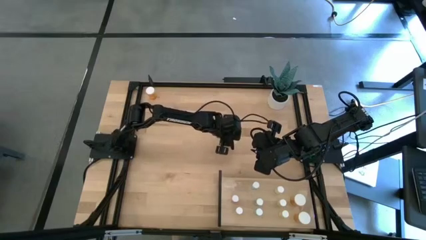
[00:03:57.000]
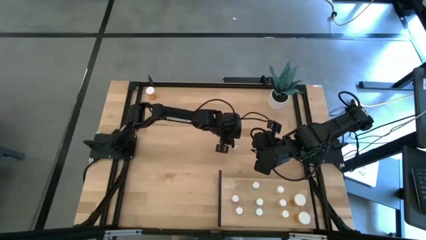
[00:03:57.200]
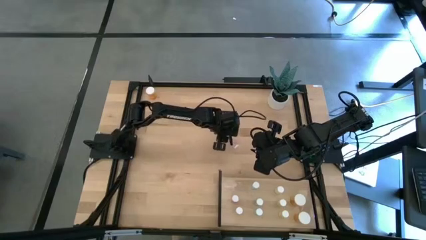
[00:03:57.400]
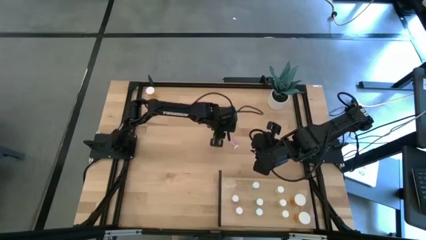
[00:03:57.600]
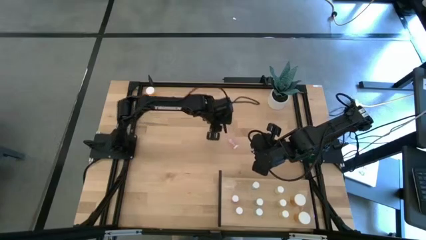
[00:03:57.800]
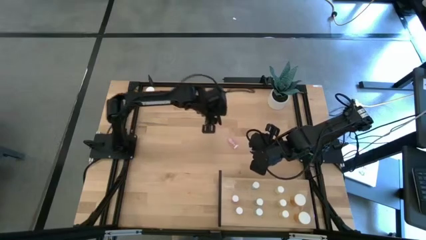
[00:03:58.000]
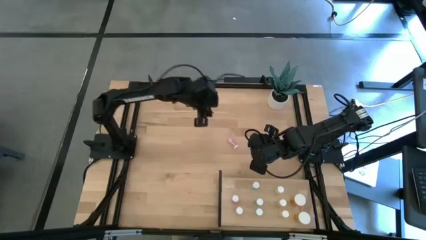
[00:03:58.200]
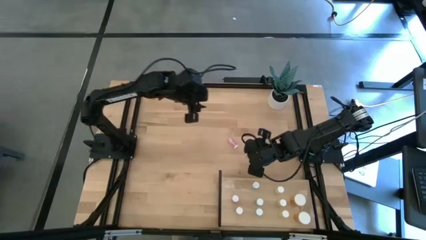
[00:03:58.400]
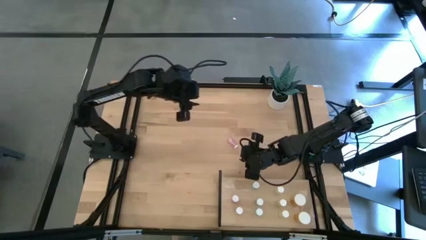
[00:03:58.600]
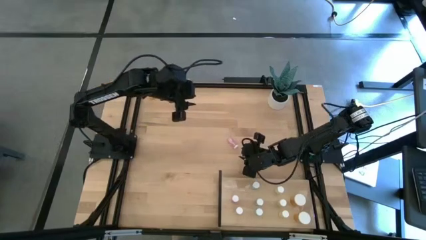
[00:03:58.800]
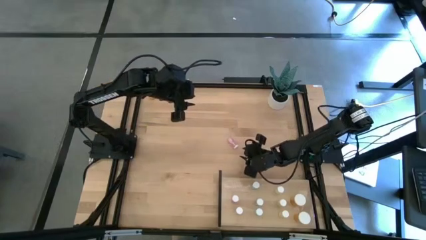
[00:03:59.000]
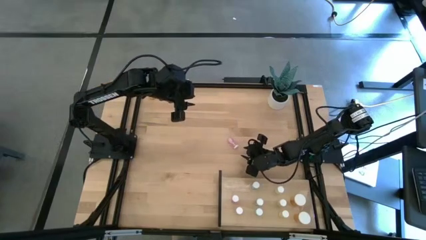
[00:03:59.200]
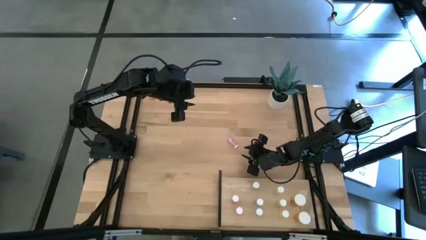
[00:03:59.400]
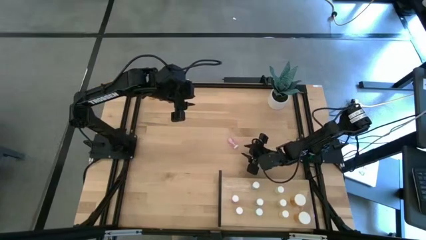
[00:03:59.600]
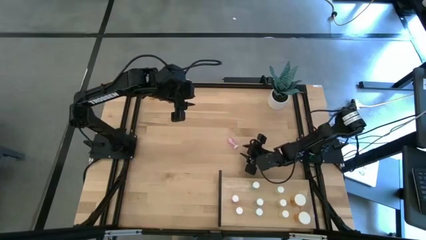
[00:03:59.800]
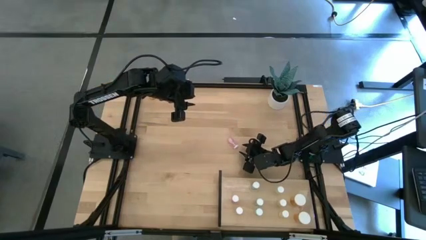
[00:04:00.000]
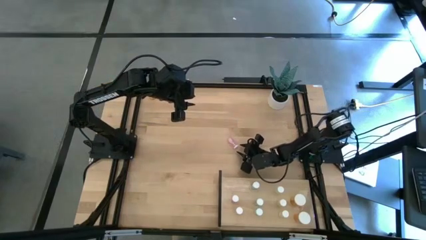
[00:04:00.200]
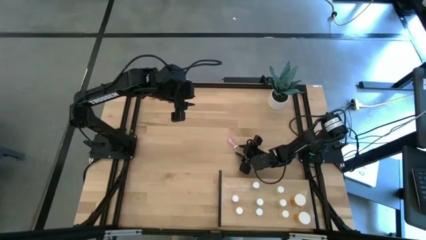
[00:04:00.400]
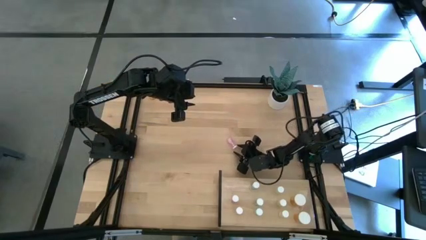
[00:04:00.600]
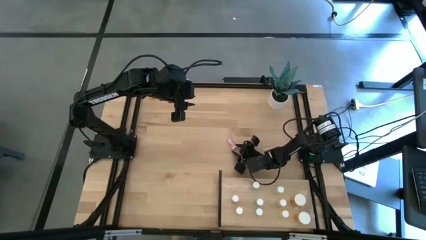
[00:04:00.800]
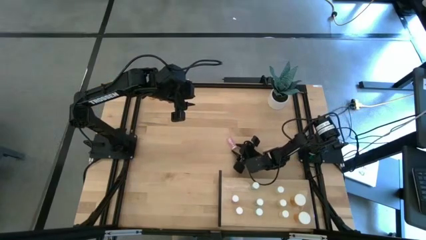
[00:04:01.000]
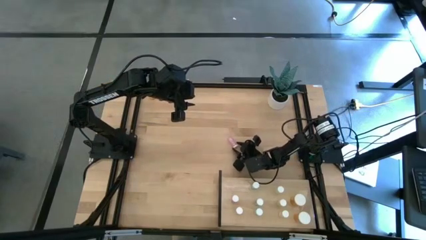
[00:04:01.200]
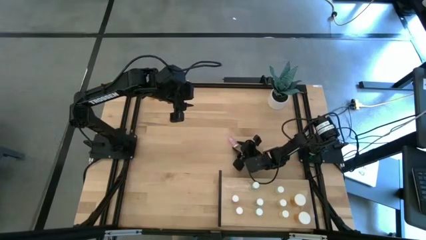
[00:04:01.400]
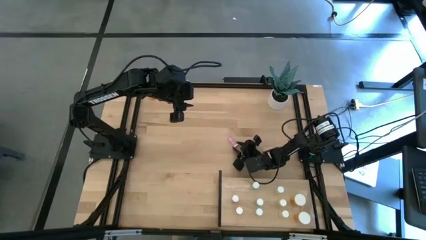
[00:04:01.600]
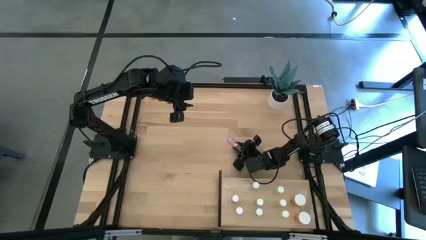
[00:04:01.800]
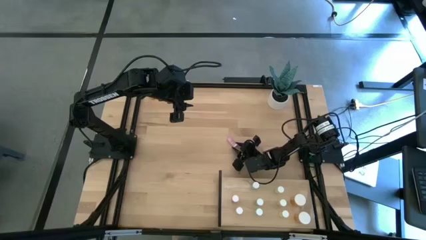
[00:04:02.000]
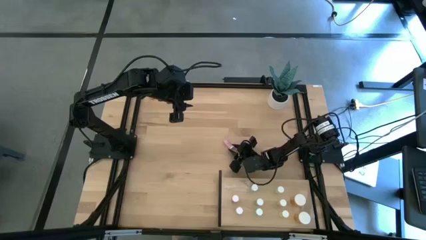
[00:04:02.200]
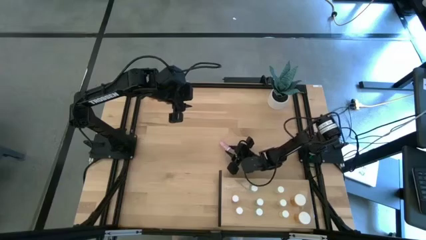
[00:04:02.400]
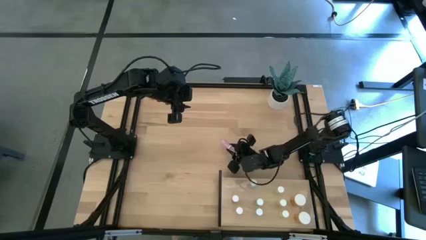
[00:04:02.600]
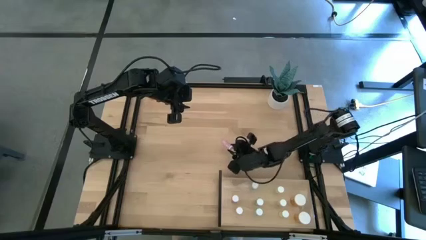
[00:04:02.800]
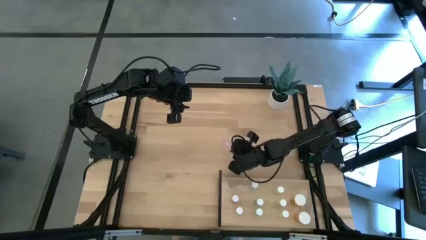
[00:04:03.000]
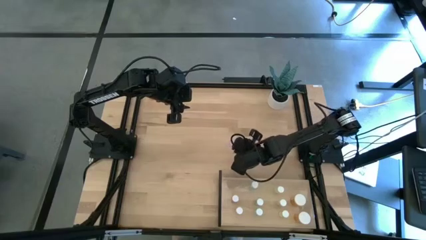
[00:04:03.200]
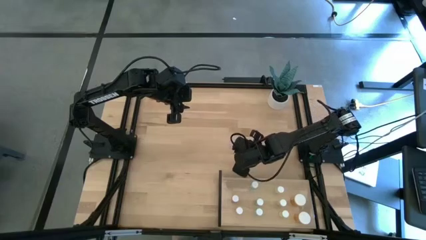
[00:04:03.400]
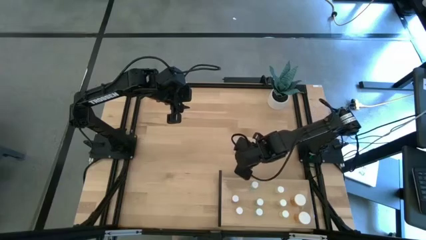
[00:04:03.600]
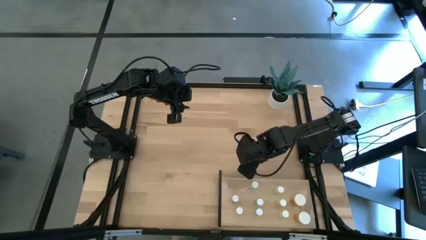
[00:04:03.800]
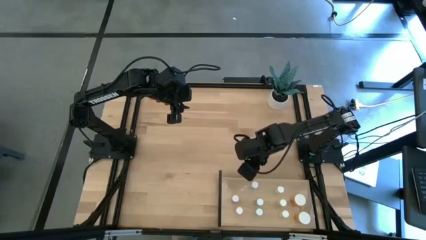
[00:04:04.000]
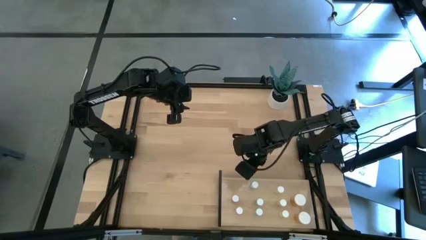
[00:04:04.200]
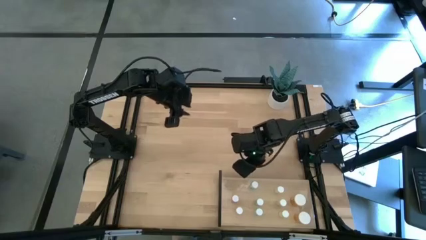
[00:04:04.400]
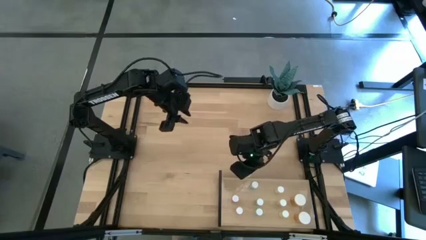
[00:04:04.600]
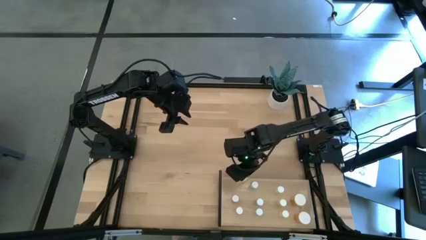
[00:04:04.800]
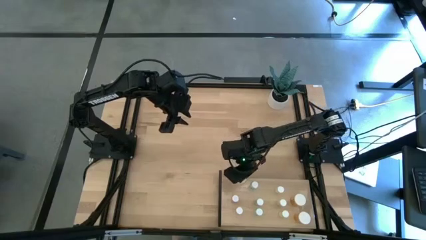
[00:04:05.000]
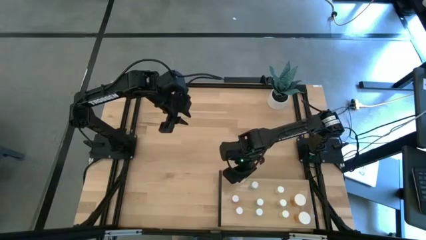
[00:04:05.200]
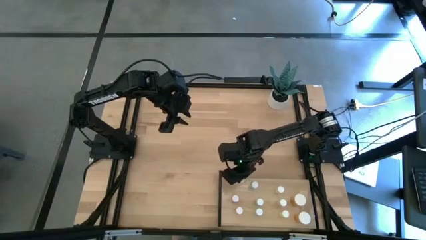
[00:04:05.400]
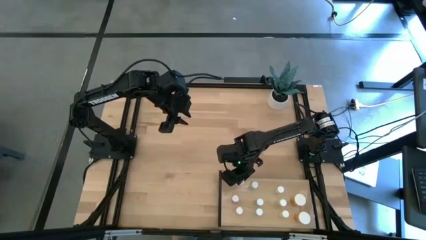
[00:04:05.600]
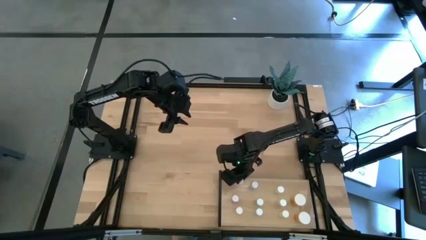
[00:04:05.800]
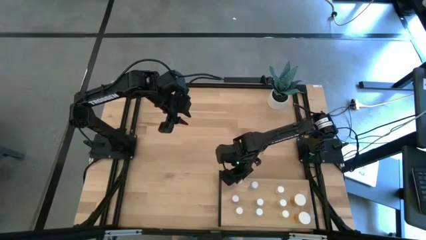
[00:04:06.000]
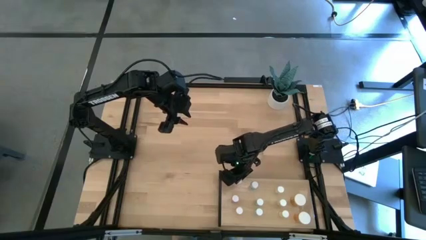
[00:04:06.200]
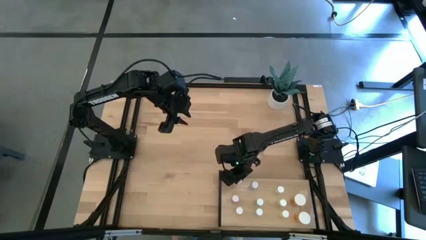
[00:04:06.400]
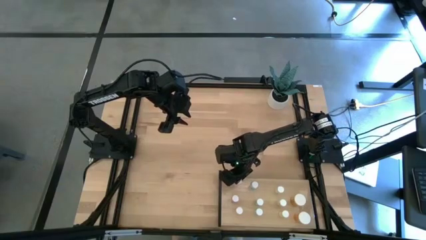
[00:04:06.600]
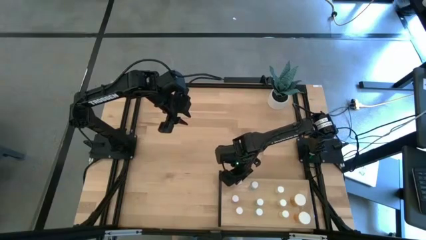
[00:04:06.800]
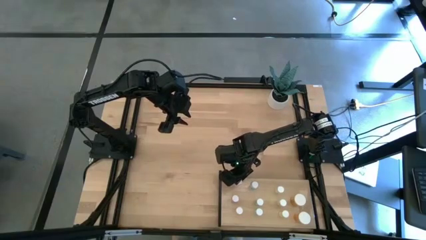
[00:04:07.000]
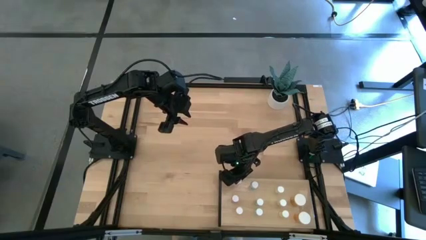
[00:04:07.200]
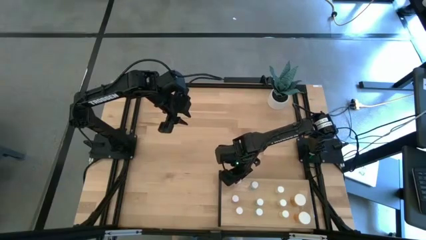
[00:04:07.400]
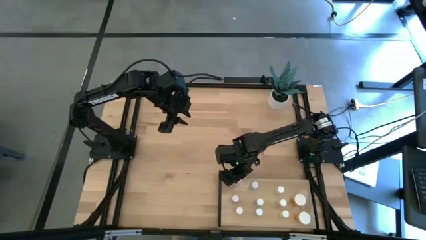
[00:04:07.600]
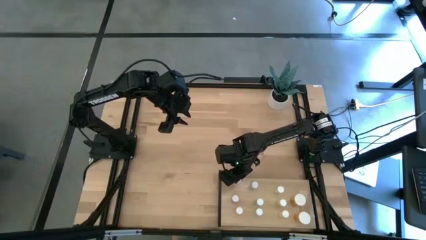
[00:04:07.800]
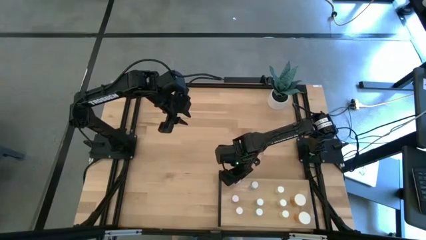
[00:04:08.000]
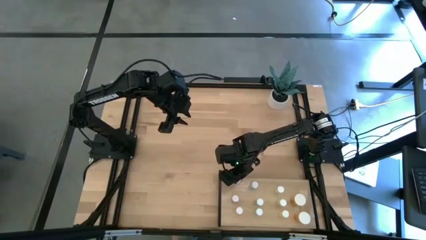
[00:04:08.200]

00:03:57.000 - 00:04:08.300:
Task: Pick and place medicine bottles onto shelf by color
Put the pink pill bottle on the shelf aligned with the other pink pill bottle

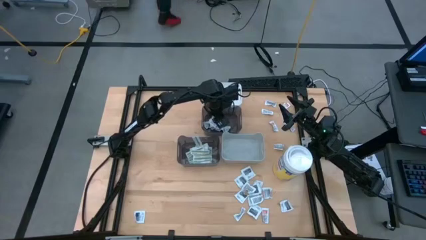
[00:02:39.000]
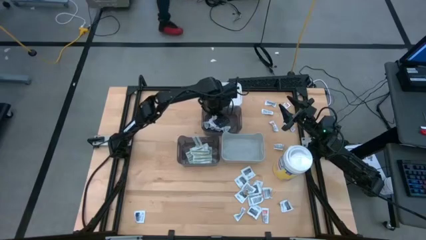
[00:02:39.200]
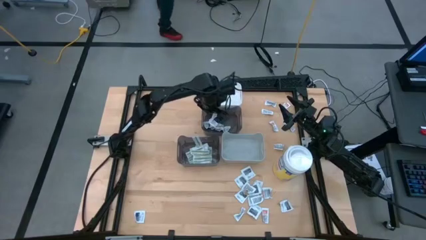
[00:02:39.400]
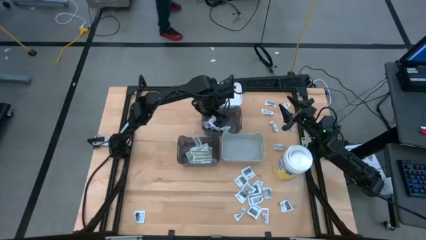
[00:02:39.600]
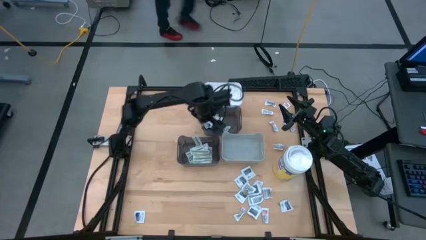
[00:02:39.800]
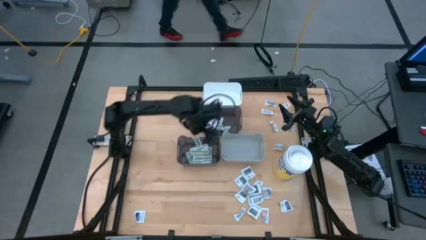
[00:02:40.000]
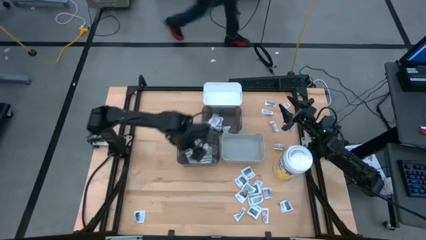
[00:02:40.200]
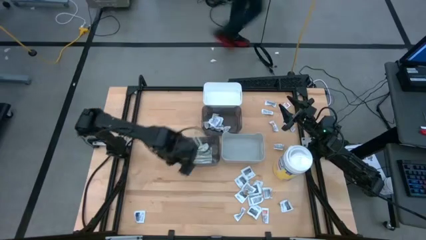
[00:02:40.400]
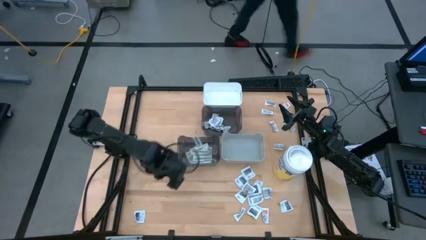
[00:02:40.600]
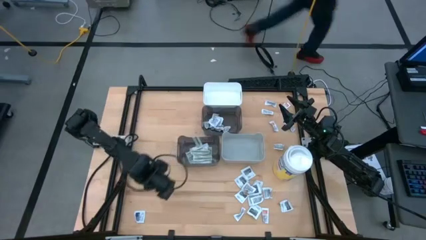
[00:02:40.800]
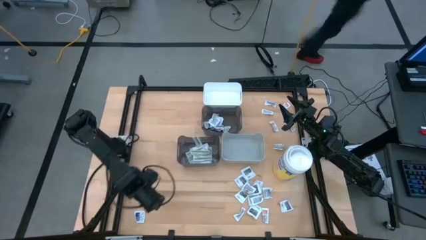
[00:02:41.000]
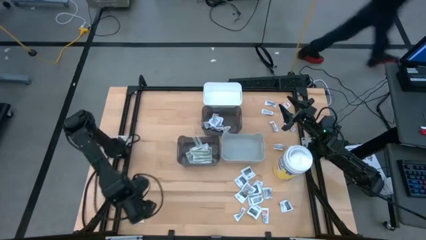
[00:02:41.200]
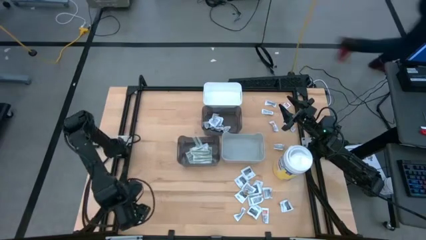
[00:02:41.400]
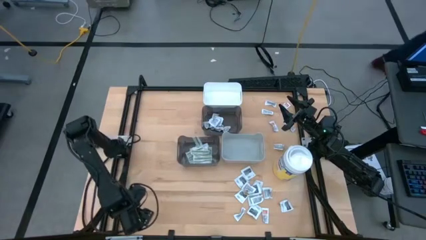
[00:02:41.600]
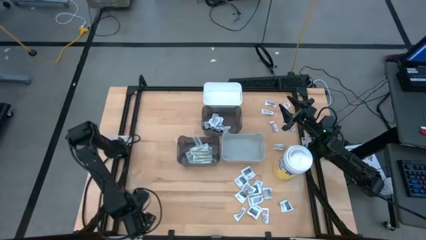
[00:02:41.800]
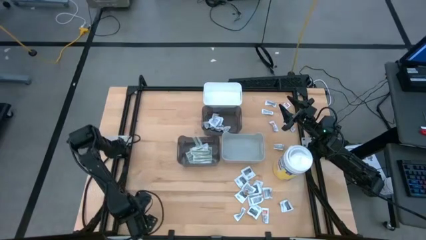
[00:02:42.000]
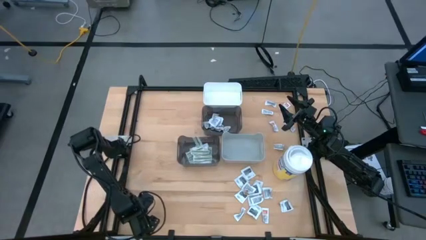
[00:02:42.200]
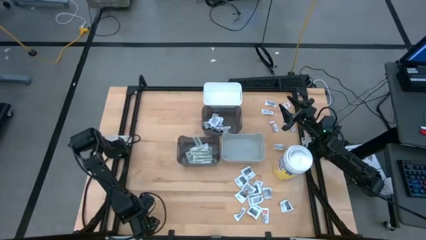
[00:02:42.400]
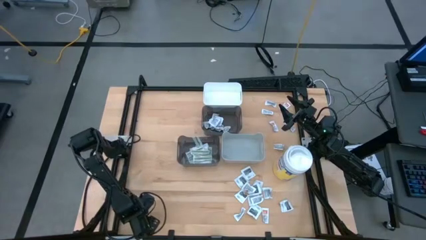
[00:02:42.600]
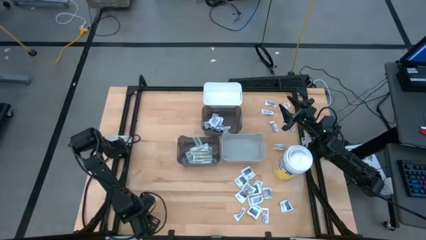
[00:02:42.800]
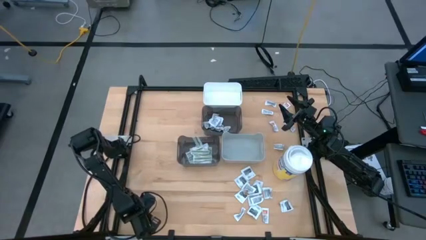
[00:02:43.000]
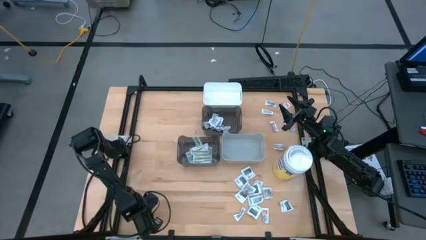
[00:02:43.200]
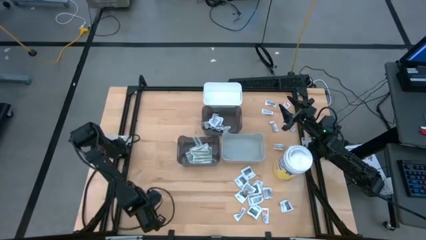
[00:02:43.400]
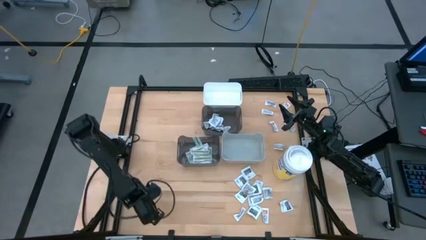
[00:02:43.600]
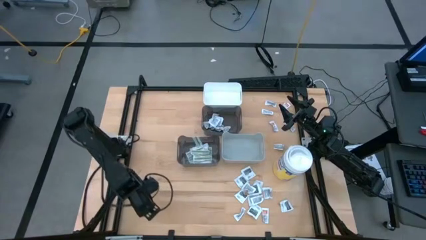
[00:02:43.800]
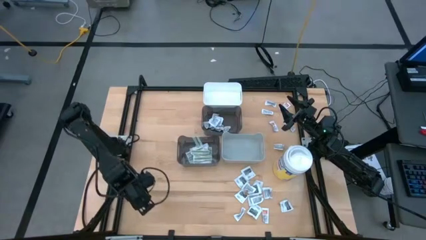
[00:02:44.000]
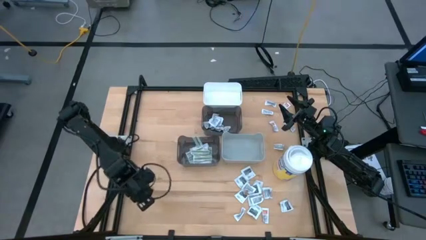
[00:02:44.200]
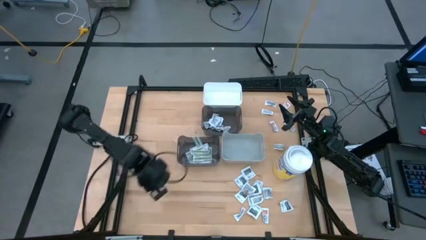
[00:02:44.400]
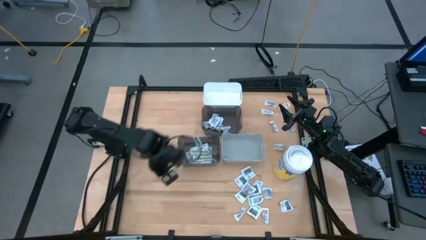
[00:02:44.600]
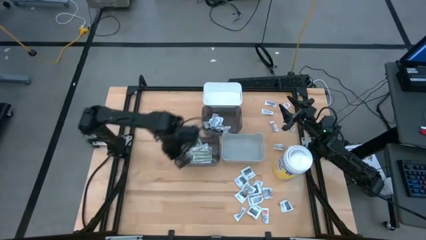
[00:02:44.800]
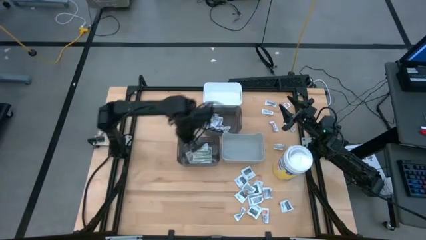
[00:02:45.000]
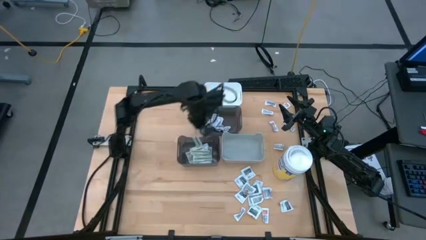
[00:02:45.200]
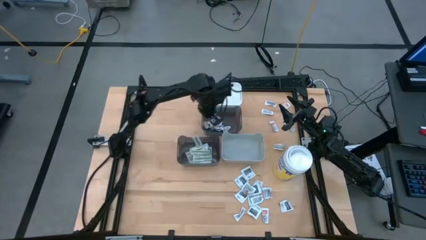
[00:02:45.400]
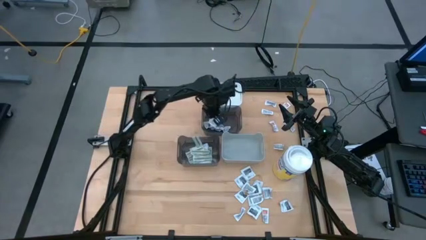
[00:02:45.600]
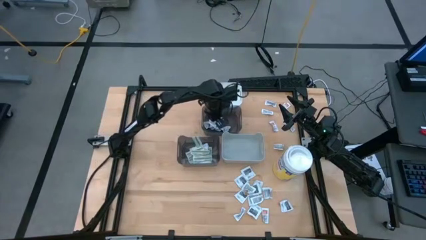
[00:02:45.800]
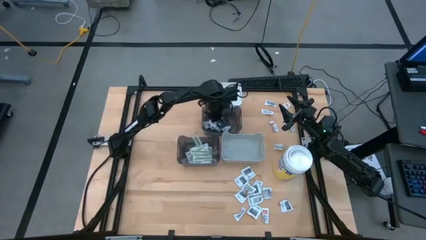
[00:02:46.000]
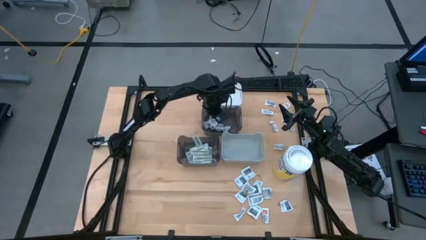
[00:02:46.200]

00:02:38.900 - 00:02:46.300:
Task: Pick & Place First Aid Supplies
Put the white alcohol pad into the top black bin
